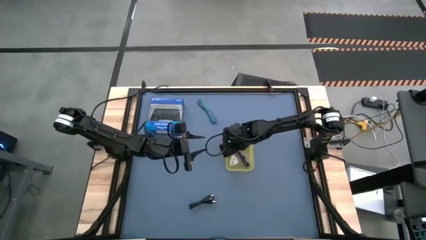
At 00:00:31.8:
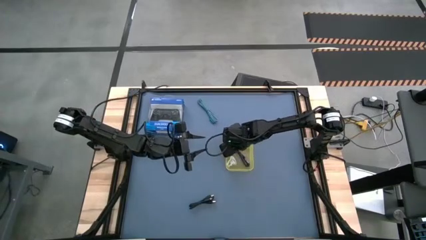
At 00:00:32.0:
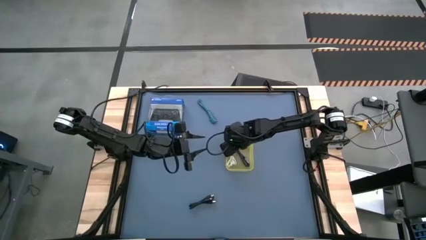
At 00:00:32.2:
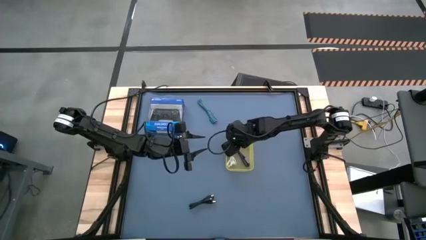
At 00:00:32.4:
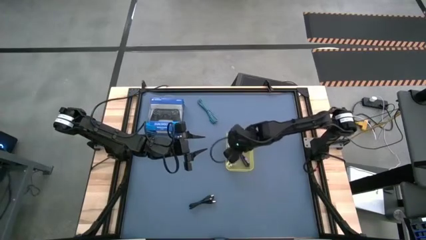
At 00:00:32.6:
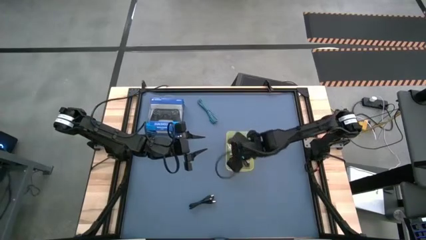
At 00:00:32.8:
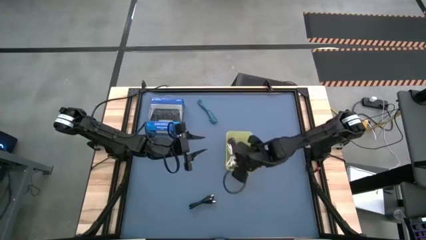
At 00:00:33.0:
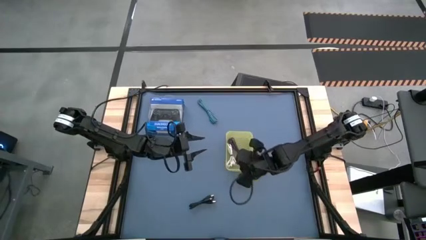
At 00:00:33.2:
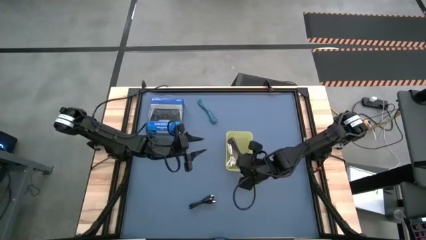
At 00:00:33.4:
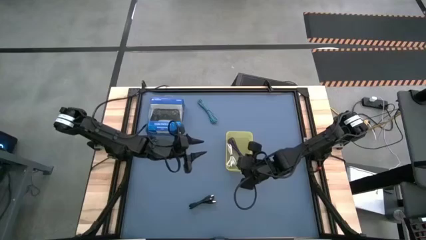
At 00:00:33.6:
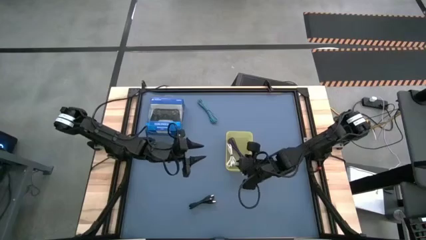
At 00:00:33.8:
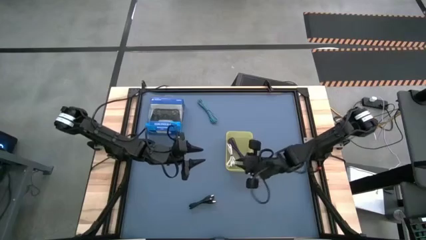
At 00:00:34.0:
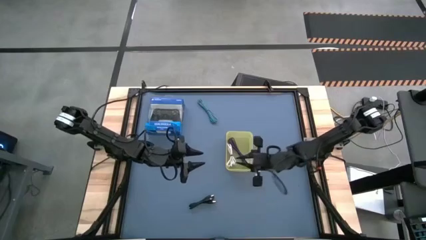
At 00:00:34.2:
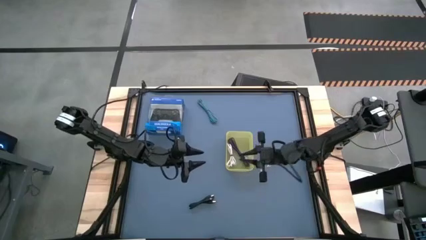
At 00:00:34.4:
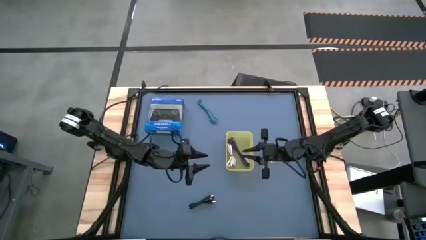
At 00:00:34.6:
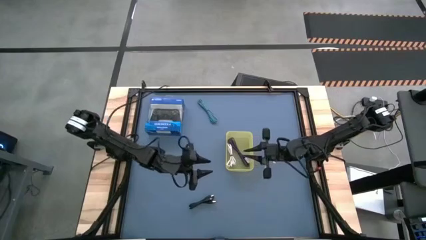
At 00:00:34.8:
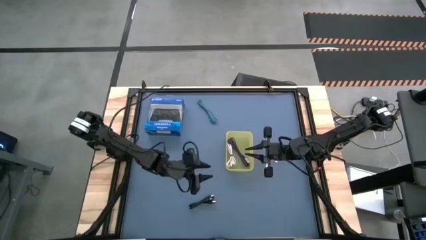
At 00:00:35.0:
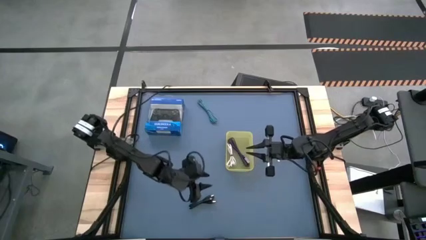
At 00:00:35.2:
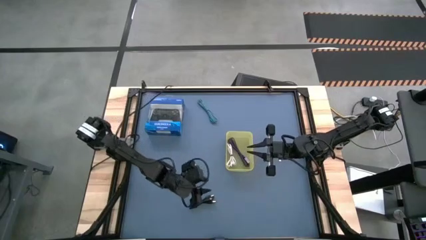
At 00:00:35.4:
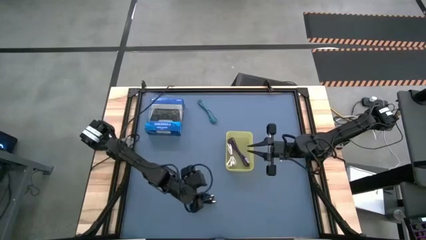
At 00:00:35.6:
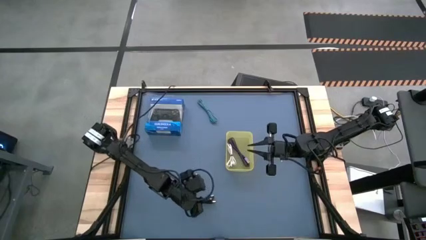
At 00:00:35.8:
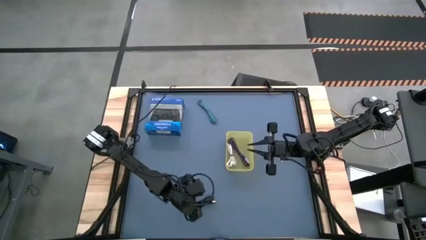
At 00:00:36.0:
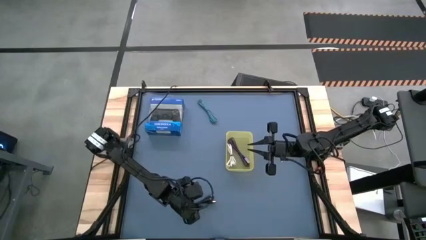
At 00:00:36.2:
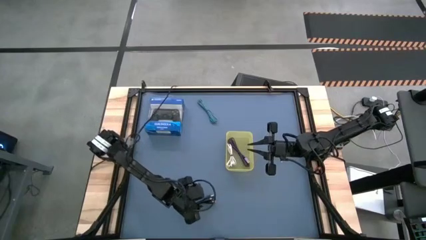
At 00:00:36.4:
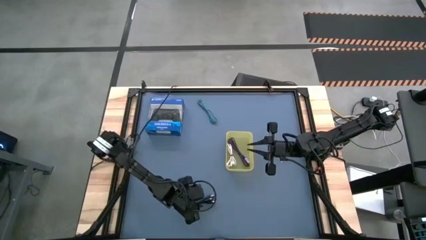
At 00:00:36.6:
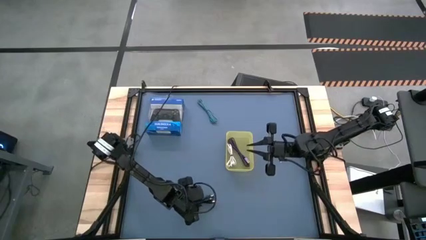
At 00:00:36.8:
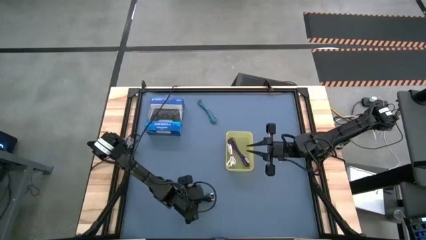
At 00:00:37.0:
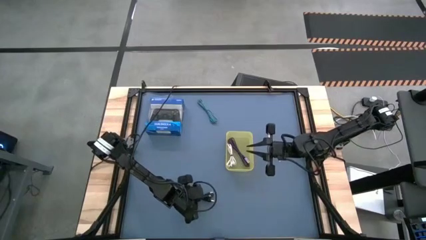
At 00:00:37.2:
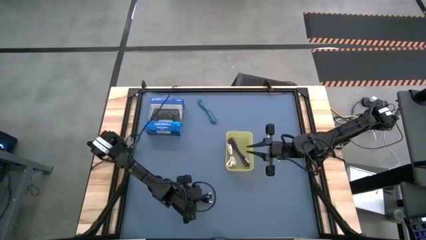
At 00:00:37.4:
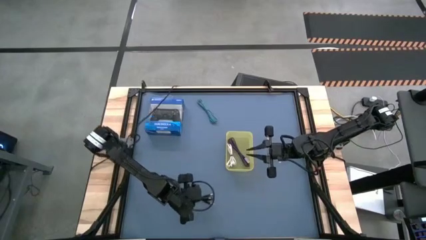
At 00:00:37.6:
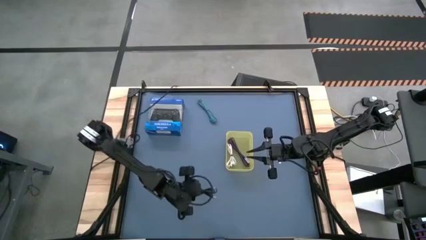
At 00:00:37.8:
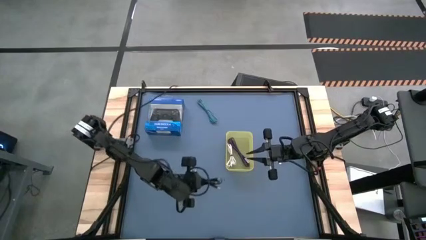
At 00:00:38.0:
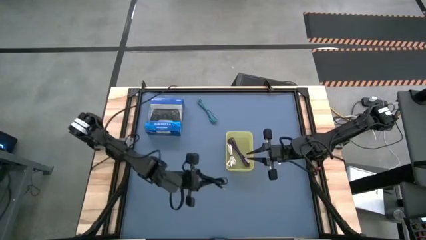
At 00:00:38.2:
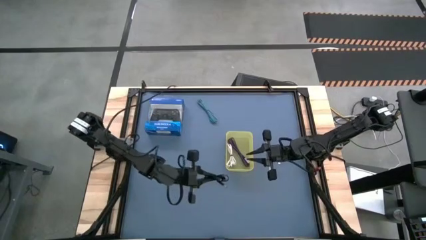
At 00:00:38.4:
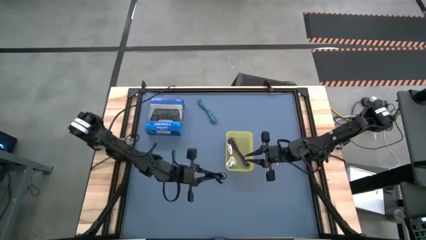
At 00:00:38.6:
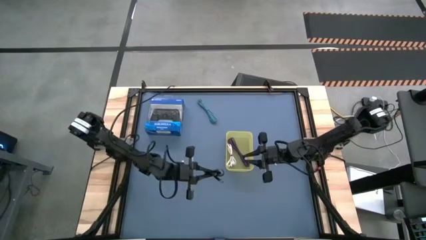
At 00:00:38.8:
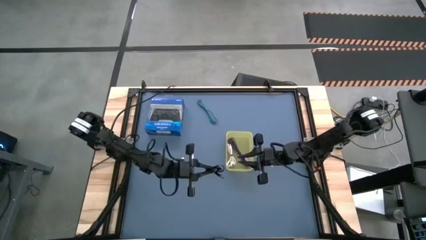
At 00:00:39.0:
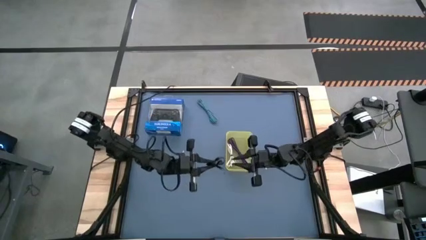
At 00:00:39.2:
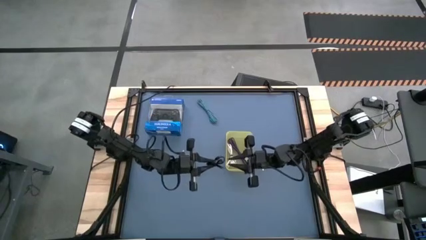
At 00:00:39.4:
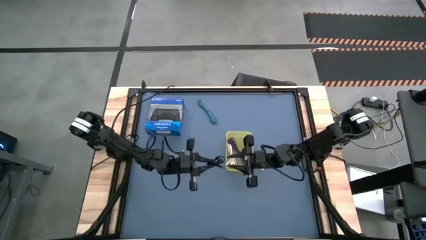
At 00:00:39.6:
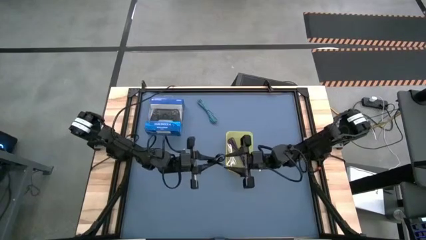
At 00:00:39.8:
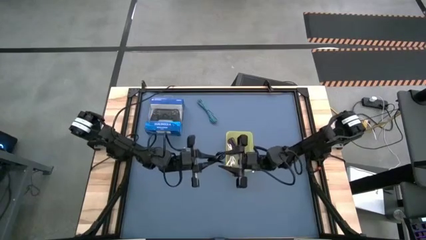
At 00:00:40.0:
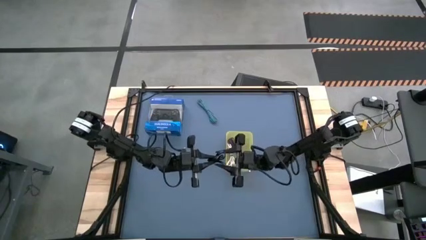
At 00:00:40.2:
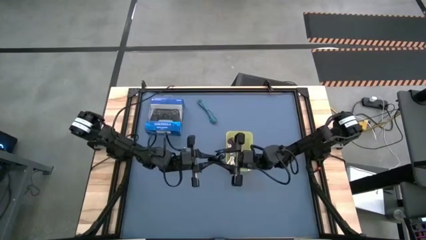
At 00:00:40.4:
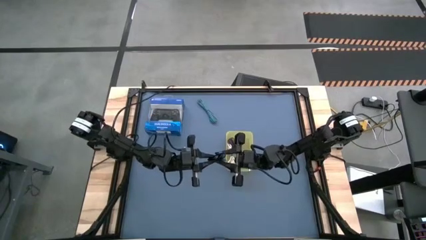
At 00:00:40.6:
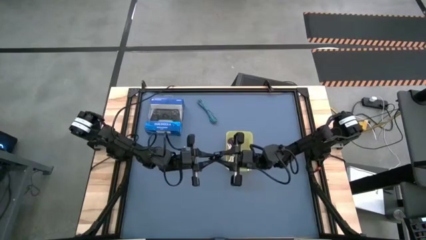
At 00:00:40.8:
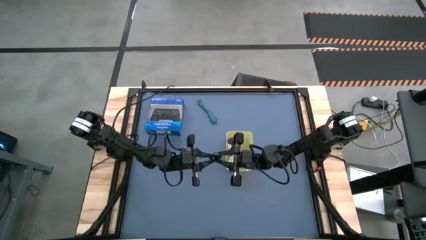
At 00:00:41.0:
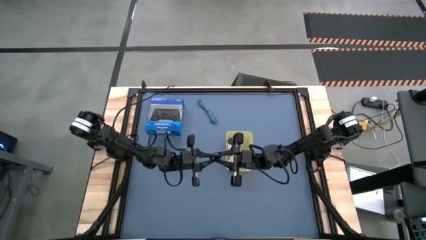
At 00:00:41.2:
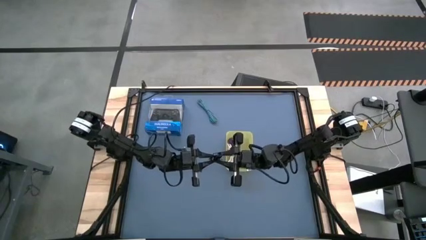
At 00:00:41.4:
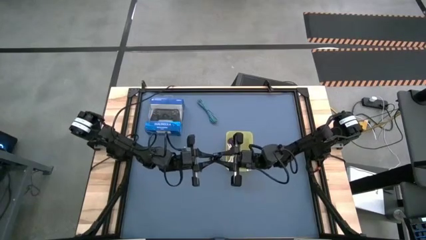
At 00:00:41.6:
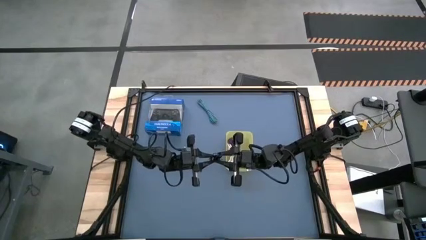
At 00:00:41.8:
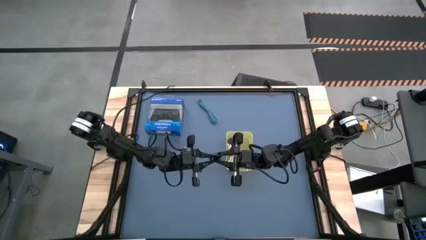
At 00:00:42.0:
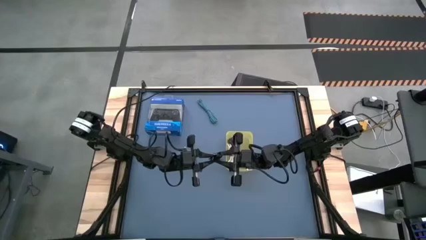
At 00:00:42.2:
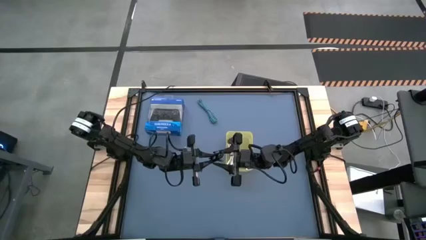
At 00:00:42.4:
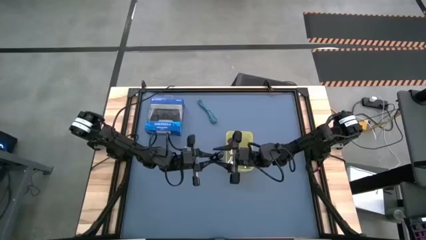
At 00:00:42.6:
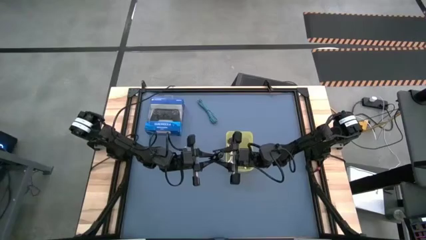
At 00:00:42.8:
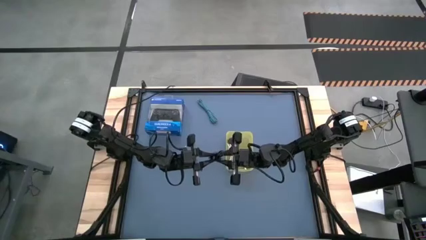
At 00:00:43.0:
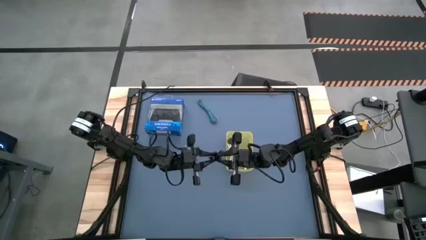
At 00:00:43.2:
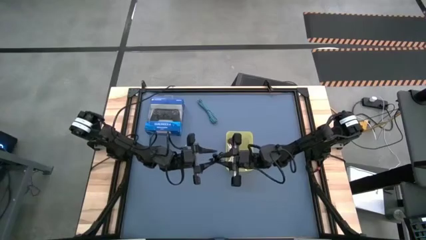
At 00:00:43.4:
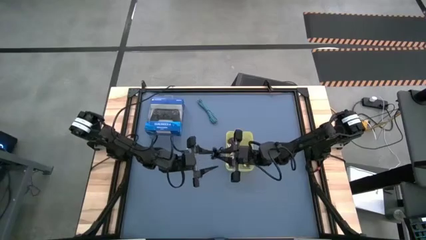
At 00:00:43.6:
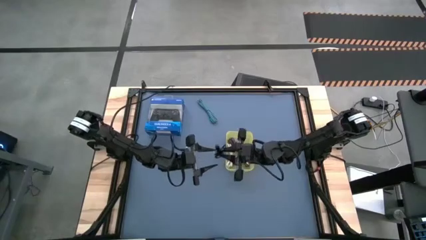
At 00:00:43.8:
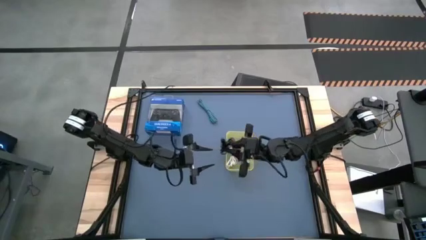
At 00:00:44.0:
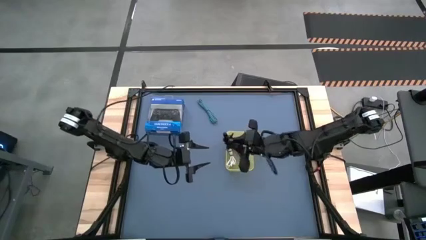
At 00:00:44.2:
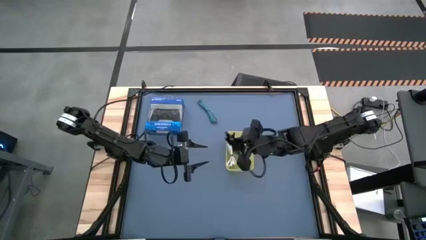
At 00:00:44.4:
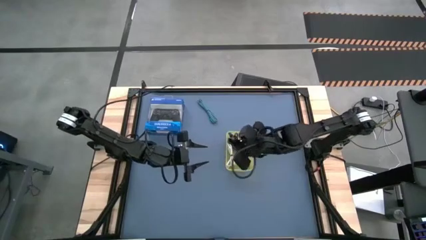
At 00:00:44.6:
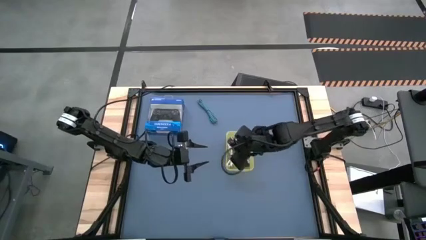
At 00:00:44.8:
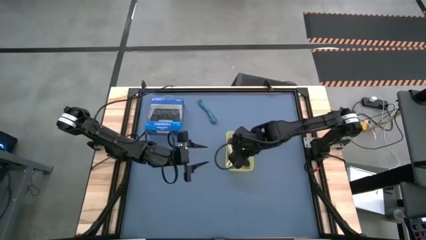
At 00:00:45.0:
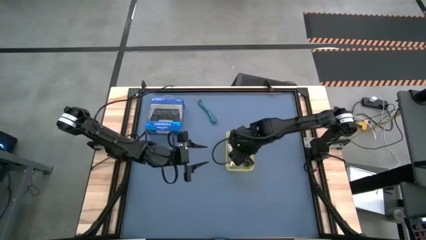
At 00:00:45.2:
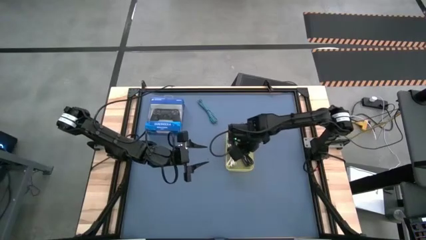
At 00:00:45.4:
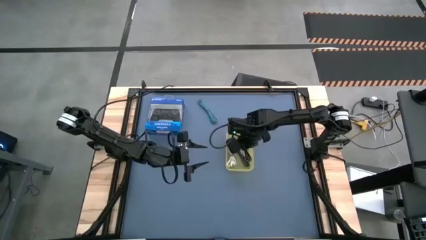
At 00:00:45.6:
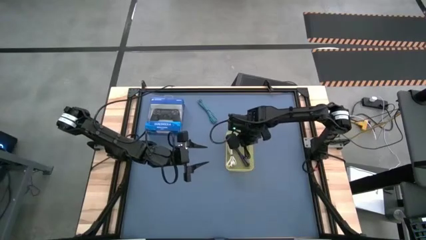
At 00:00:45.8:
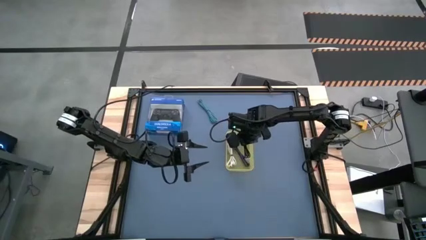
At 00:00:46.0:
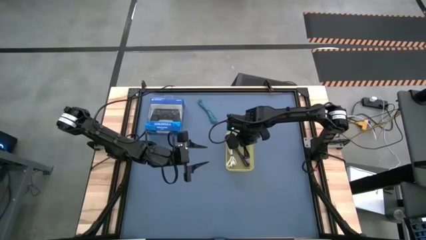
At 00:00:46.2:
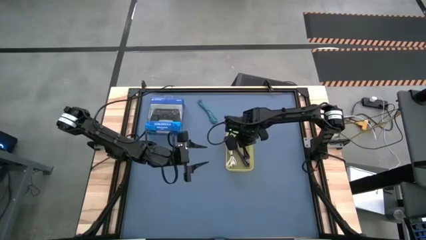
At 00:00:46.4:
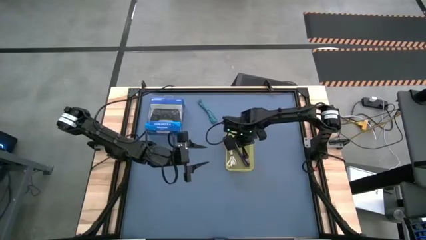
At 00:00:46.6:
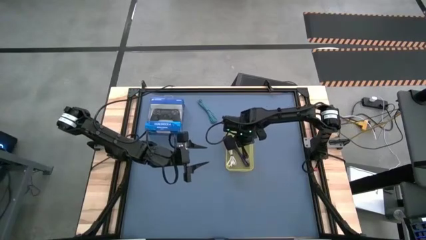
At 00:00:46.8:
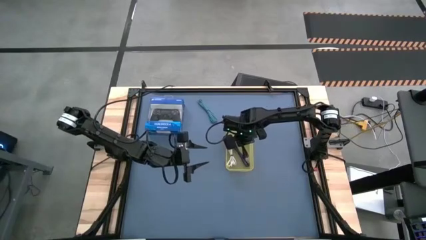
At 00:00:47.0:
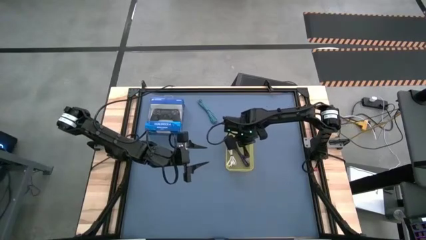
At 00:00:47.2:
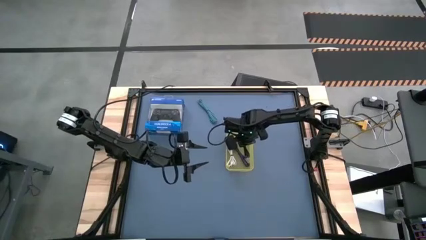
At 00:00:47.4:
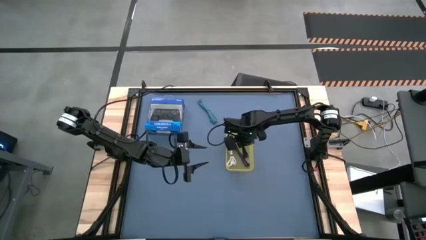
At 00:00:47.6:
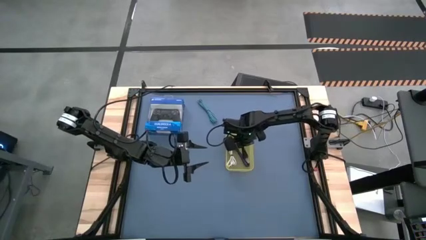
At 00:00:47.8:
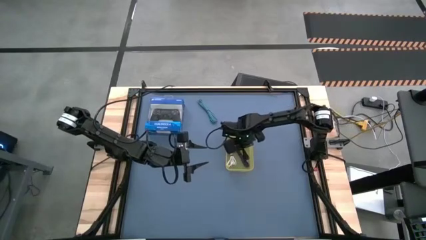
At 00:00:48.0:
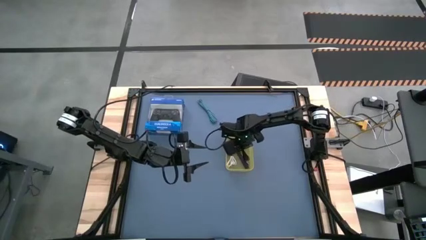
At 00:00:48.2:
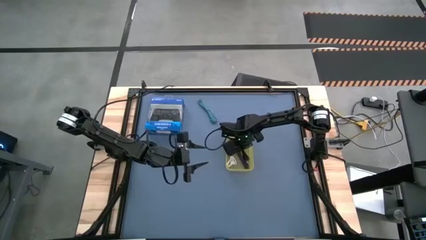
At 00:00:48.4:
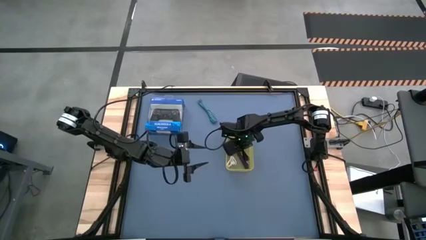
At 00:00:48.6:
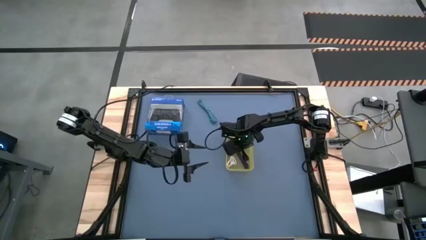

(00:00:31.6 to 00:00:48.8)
Task: Pick and place USB-C Cables
Put the black charger cable into the yellow bin
